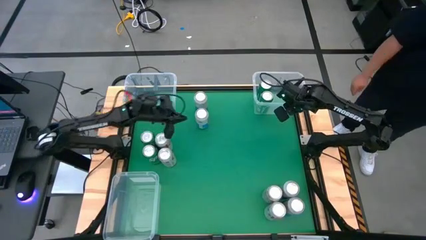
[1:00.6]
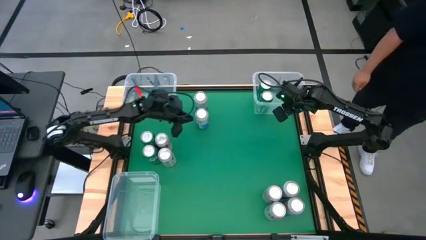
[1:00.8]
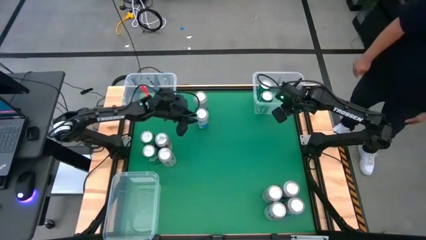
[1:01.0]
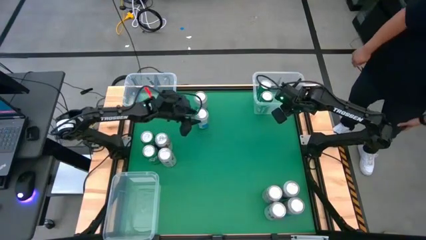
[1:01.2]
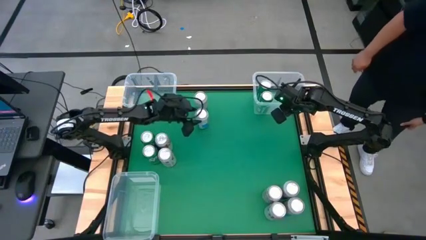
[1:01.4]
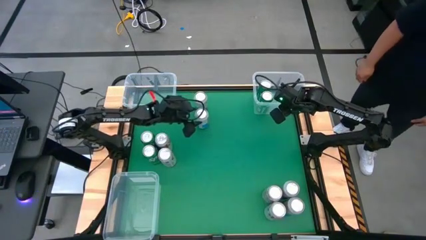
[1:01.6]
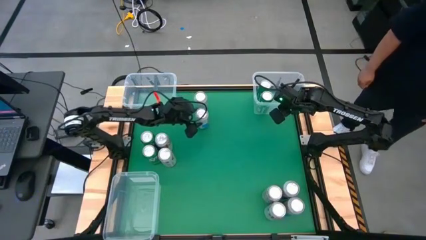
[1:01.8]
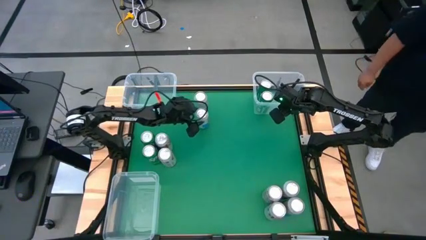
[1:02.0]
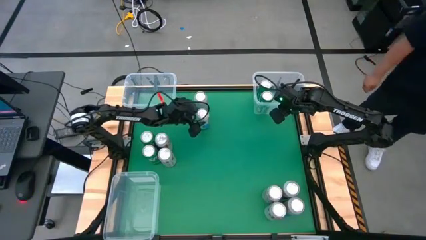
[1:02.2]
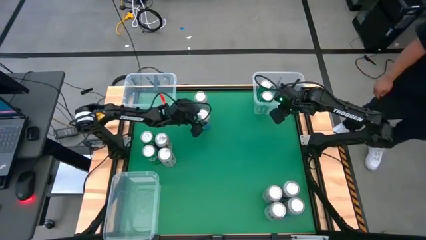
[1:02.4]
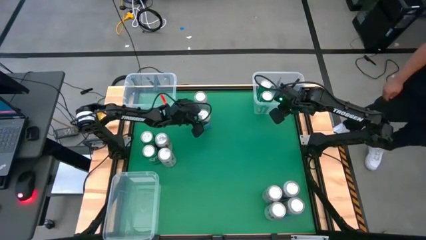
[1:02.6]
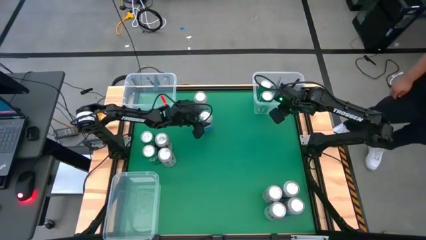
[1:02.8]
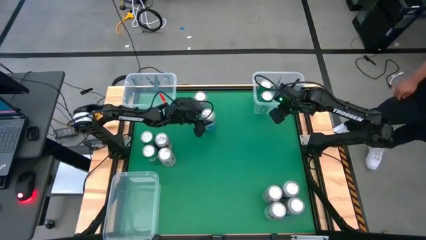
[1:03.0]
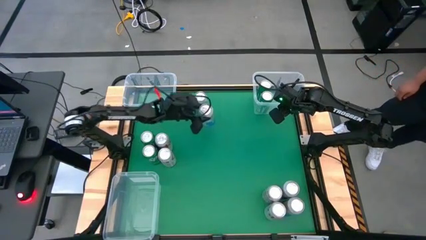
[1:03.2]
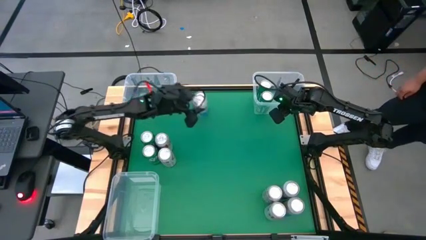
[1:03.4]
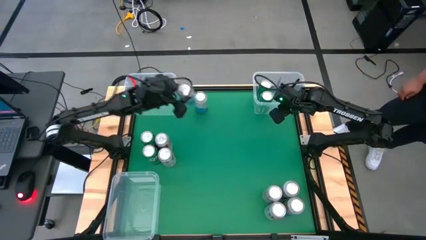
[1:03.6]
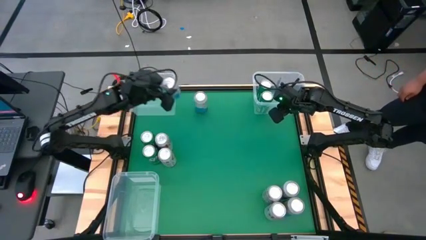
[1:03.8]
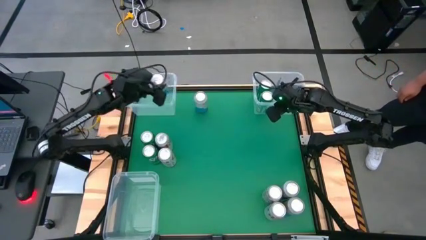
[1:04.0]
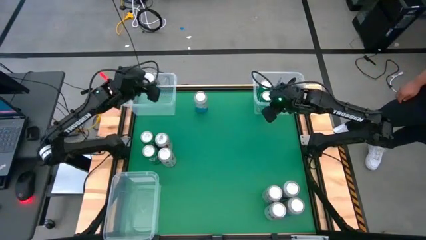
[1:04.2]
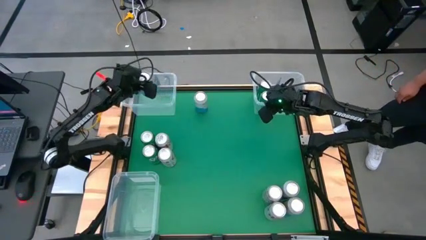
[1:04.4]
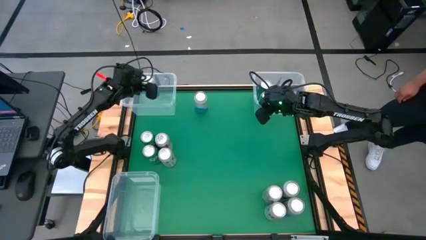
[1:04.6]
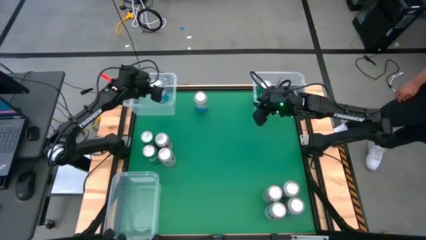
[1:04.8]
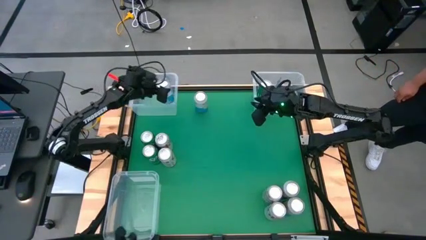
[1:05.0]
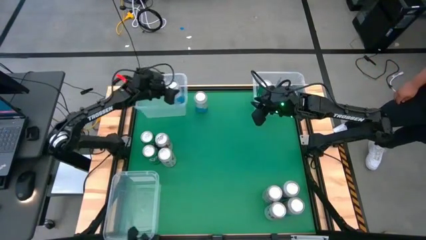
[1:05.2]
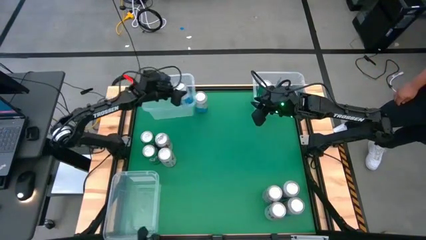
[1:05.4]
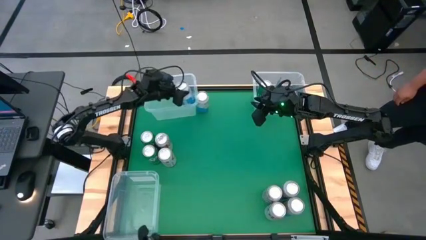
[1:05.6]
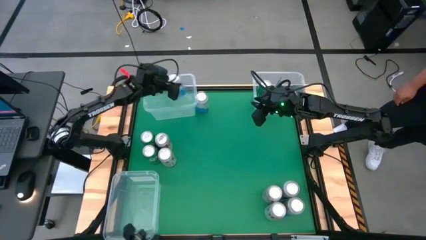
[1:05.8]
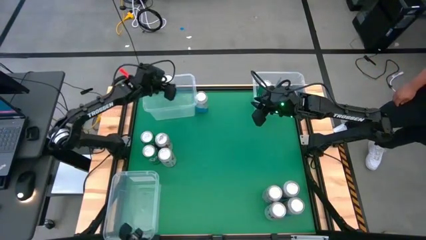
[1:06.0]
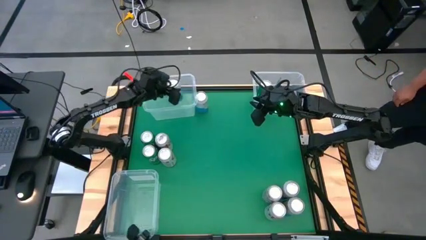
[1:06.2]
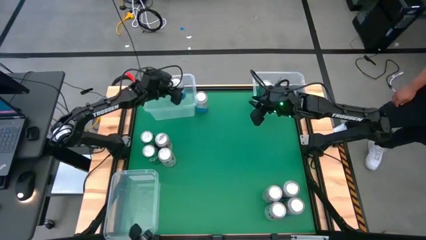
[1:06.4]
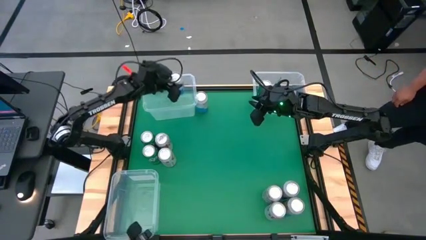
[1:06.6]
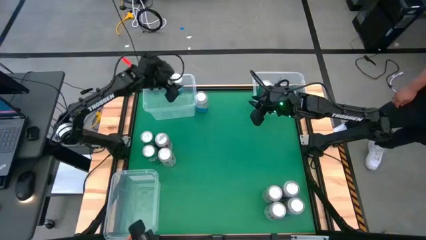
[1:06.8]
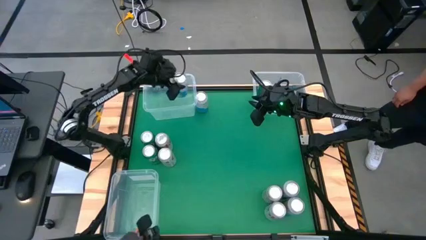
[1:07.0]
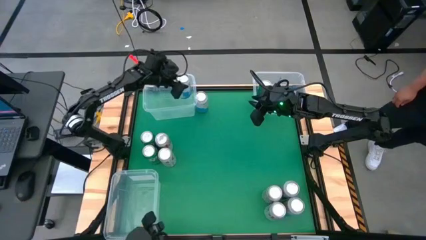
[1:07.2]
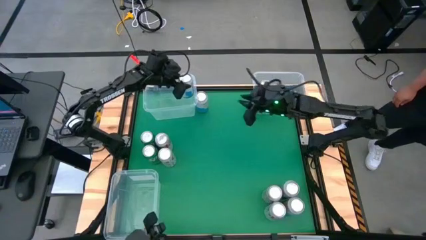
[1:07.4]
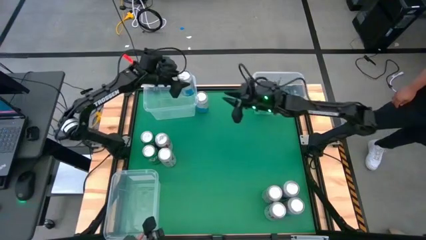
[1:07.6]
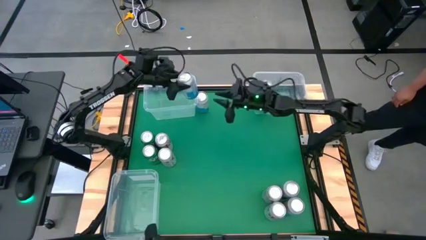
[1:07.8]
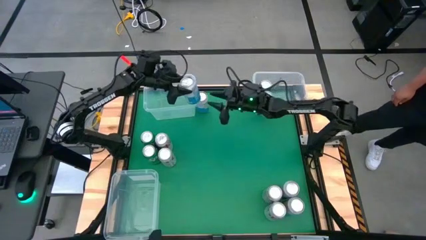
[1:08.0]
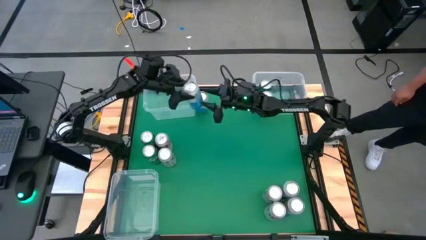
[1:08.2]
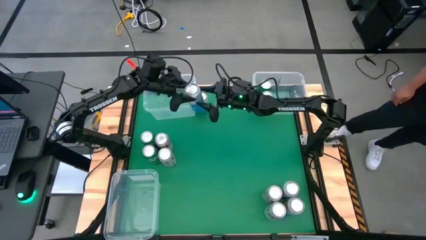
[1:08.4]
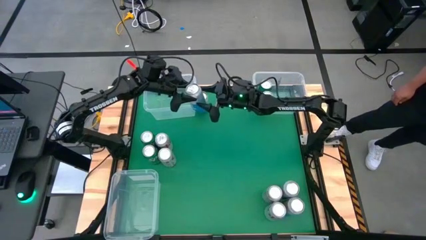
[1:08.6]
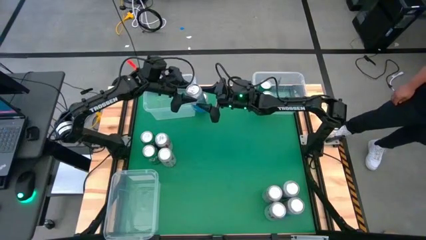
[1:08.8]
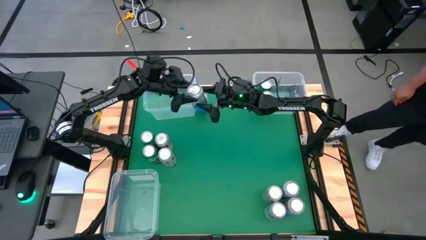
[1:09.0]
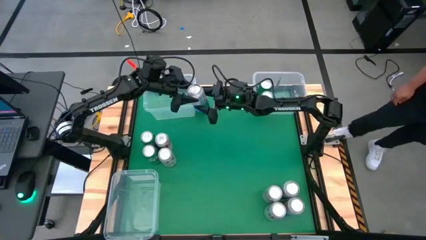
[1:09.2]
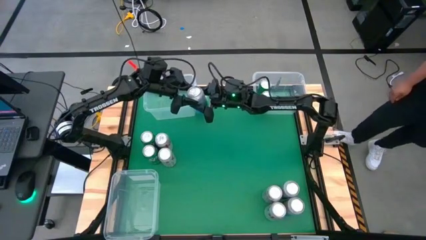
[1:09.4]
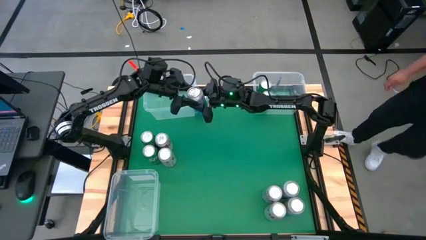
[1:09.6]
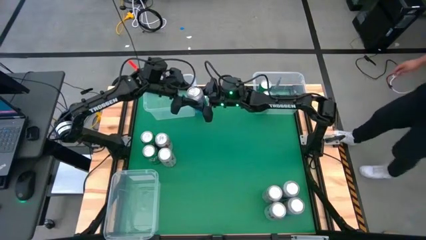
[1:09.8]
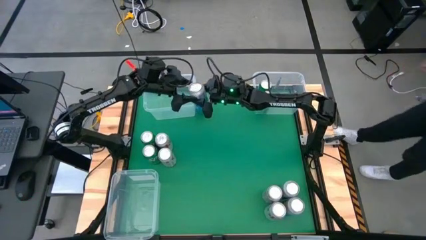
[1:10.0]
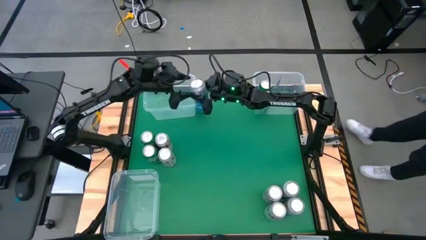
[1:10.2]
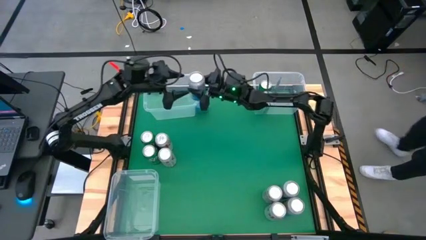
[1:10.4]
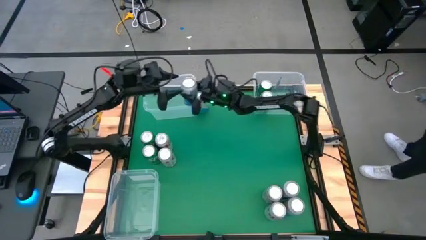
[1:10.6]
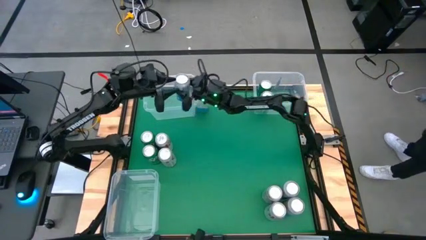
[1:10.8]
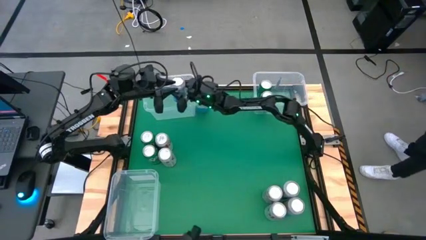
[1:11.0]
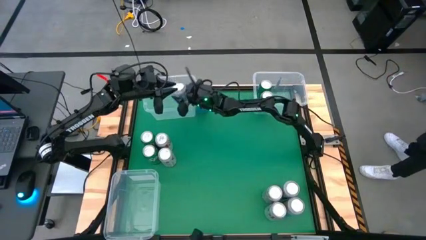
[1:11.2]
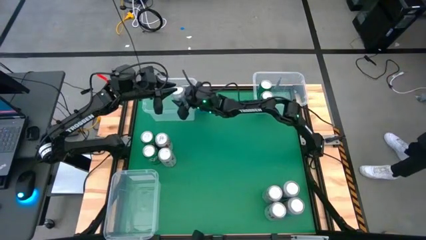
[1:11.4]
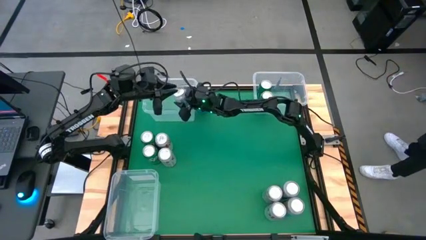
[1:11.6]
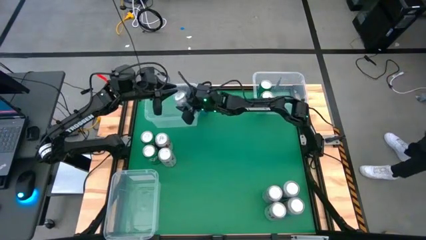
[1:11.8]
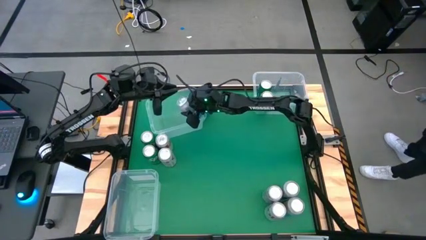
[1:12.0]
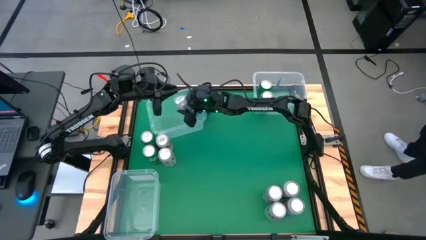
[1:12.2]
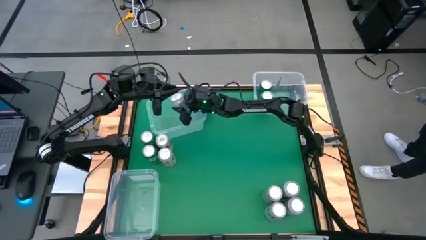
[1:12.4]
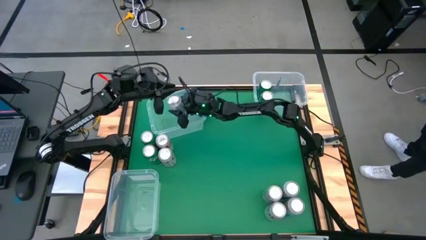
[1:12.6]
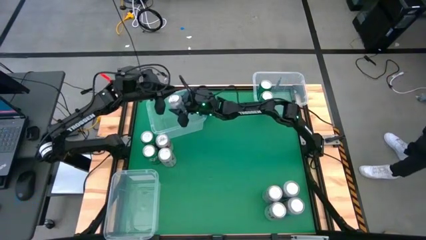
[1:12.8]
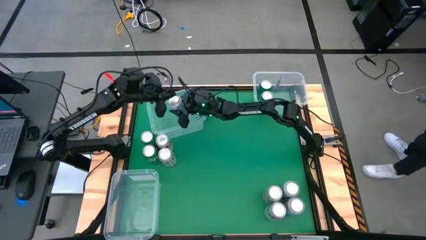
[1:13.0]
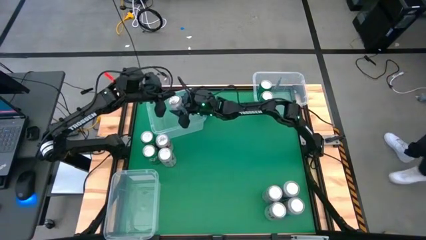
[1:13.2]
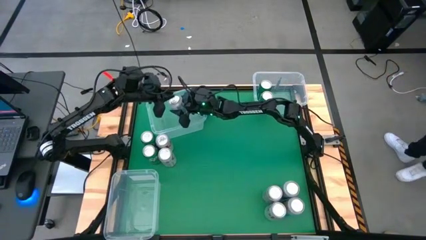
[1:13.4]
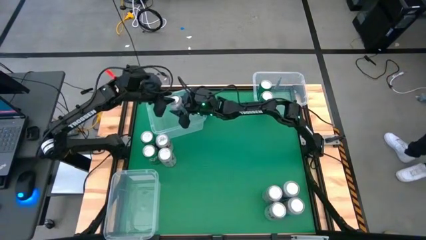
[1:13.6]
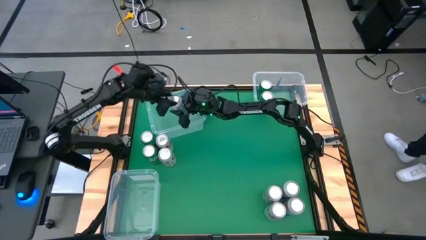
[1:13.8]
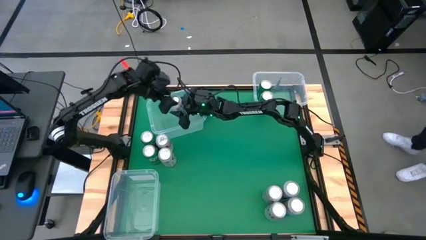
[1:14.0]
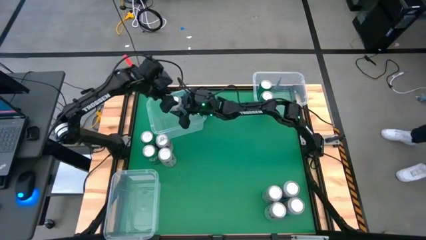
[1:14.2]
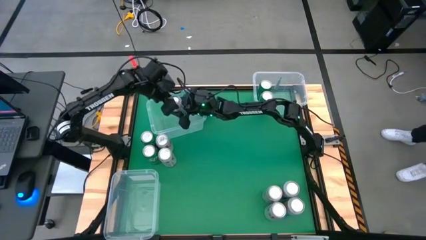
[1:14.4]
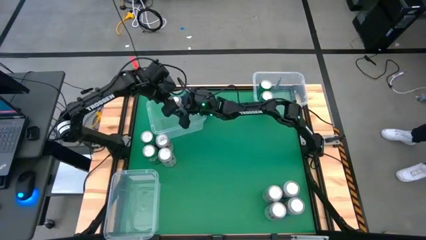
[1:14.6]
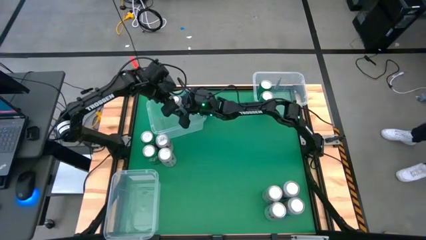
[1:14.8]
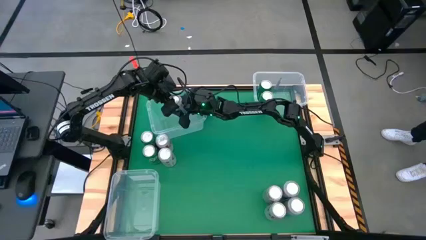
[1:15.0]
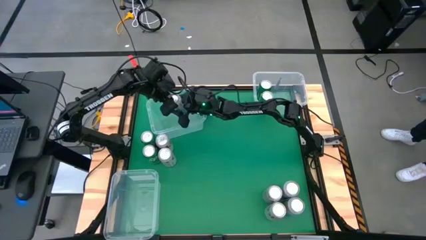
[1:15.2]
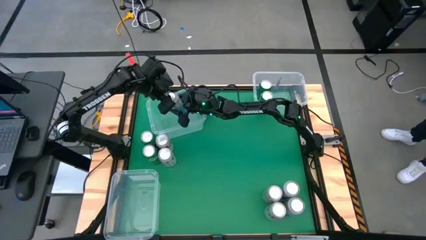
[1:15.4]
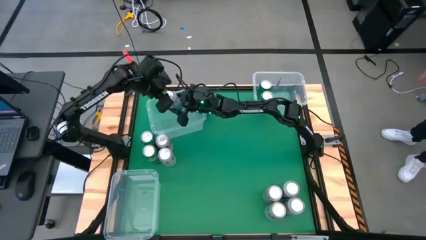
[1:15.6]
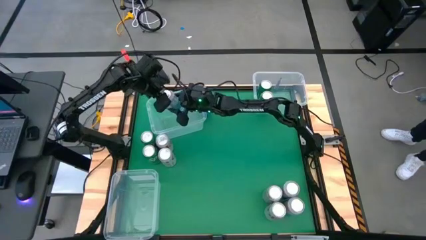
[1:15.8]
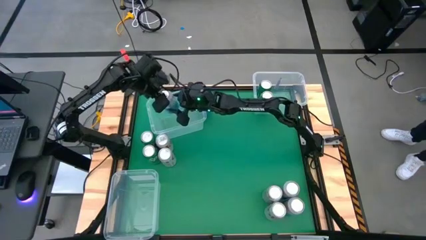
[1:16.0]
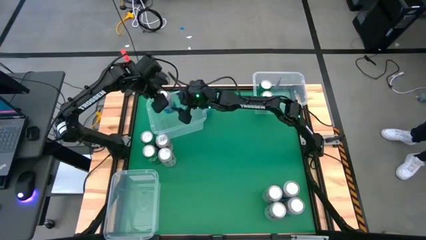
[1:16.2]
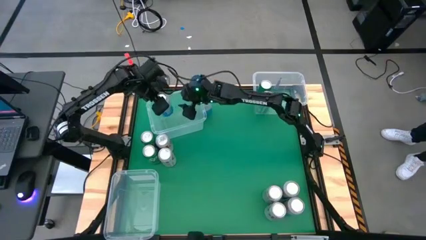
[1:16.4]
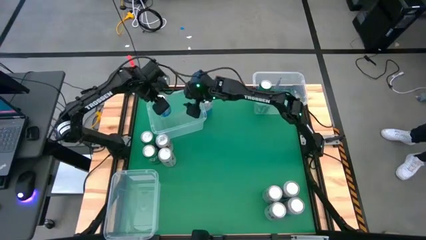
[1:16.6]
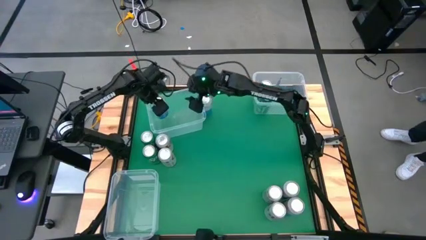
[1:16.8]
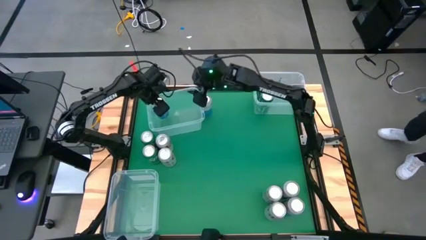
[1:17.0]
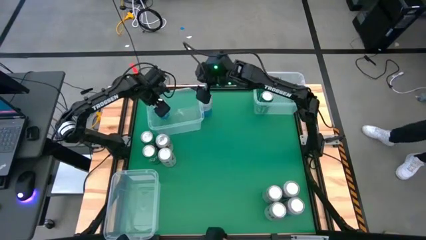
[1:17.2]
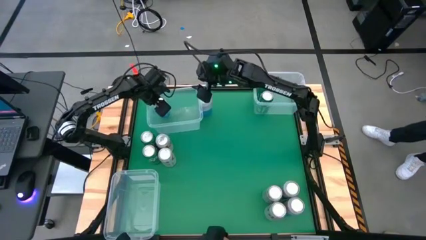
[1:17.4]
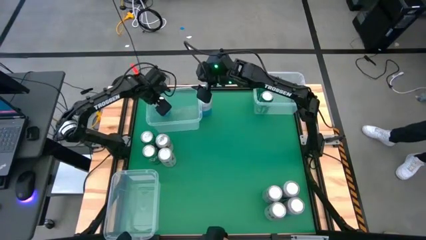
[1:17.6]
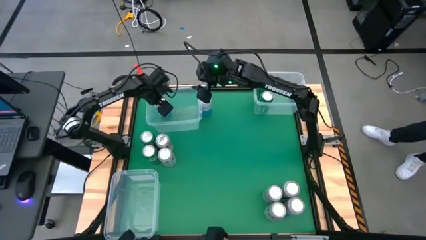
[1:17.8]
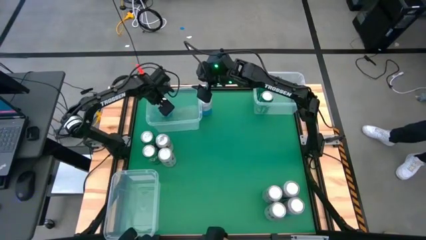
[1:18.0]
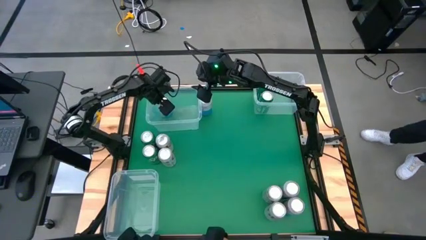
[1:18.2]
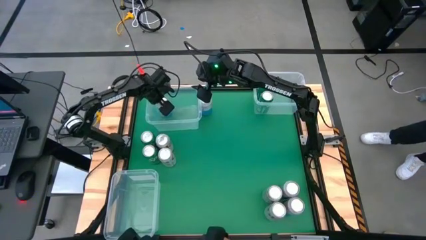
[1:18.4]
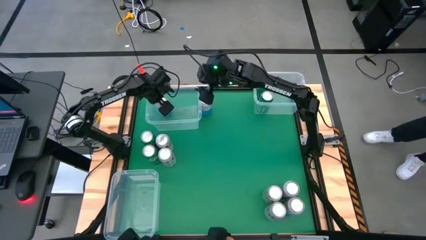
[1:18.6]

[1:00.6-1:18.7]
Task: Sort soda cans
Put the blue white soda can into the top left transparent bin
